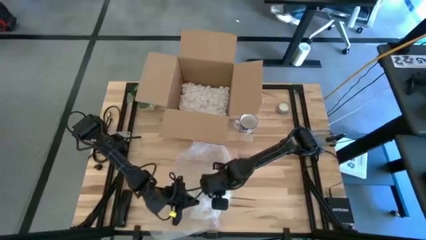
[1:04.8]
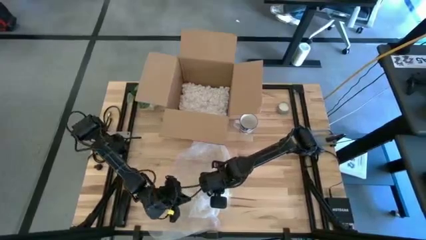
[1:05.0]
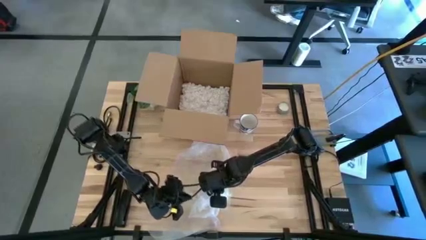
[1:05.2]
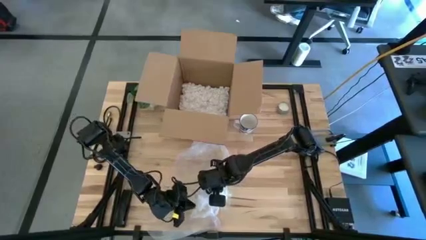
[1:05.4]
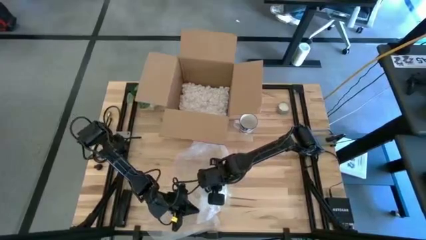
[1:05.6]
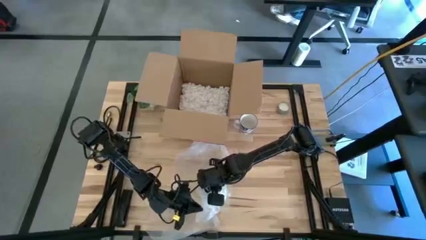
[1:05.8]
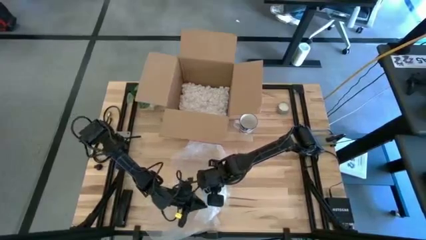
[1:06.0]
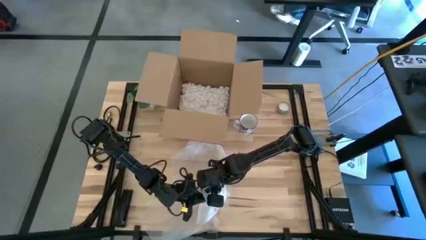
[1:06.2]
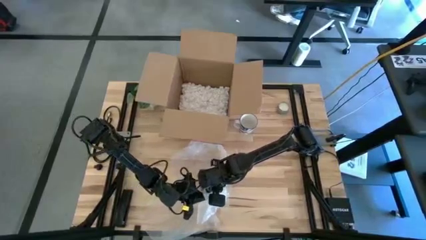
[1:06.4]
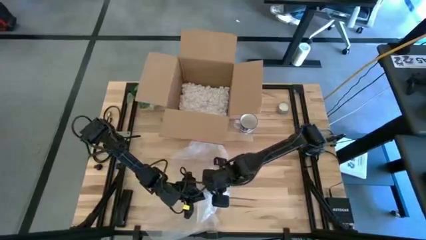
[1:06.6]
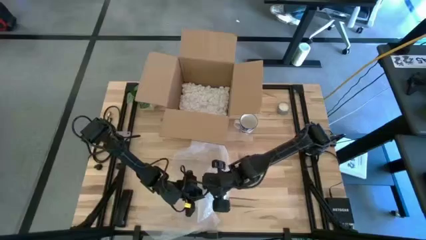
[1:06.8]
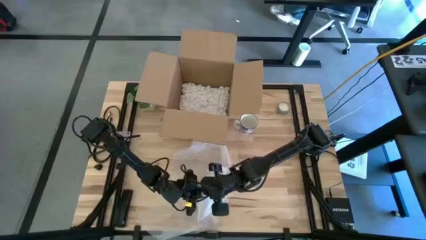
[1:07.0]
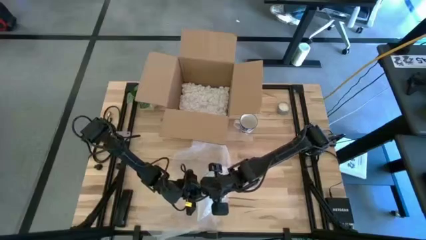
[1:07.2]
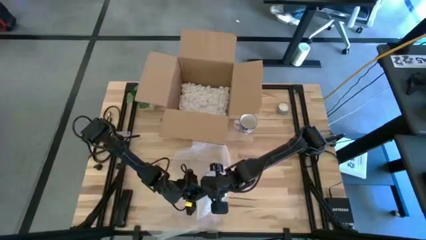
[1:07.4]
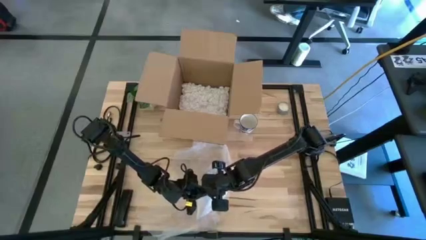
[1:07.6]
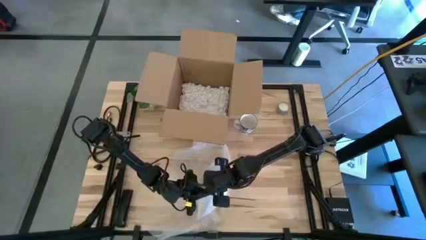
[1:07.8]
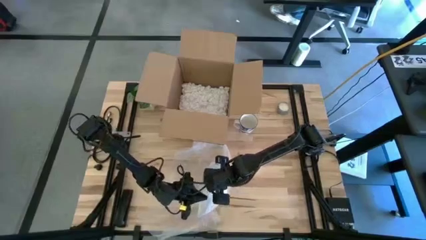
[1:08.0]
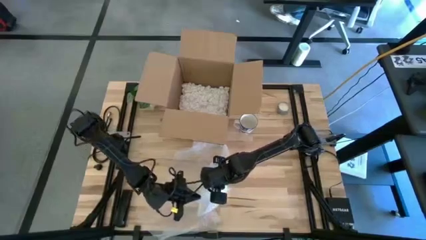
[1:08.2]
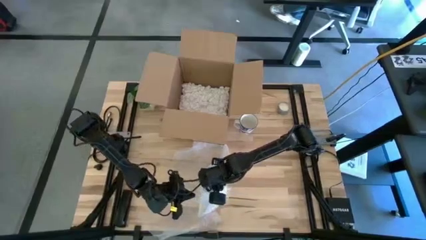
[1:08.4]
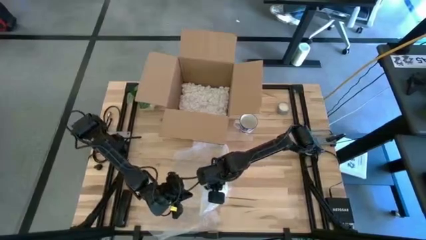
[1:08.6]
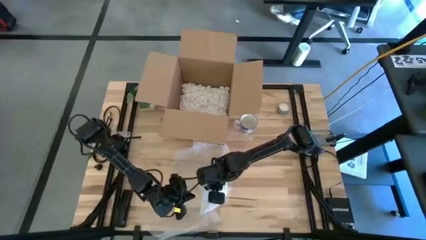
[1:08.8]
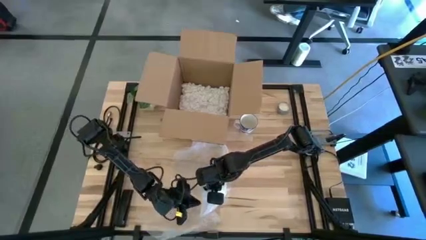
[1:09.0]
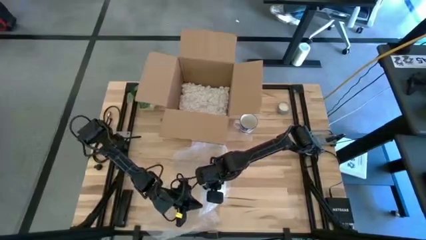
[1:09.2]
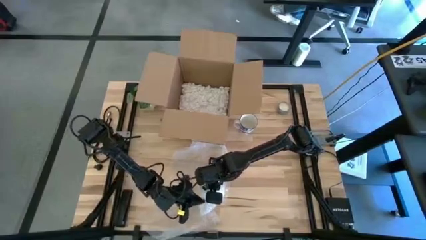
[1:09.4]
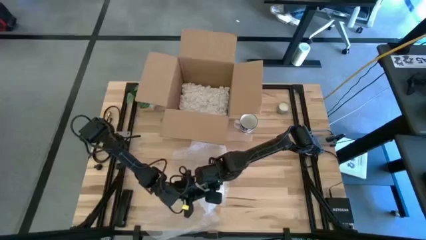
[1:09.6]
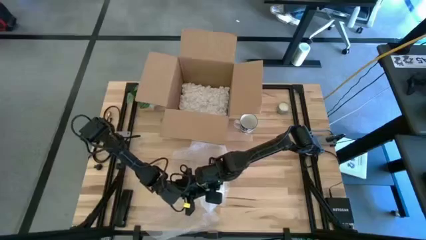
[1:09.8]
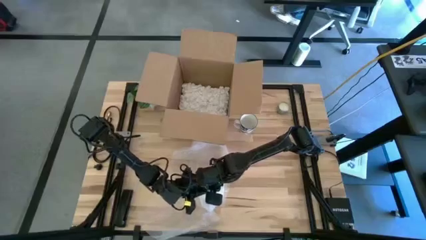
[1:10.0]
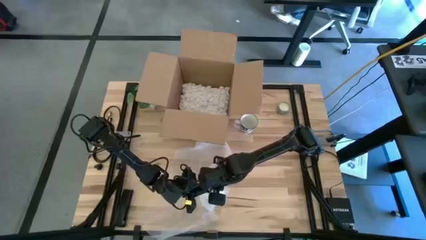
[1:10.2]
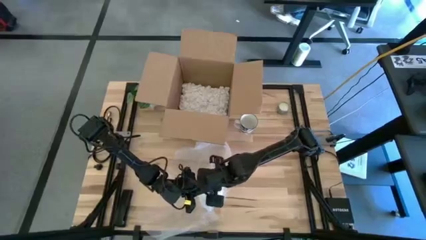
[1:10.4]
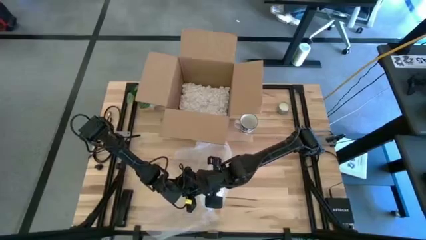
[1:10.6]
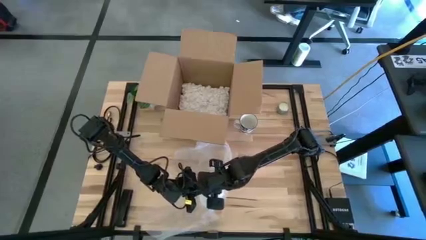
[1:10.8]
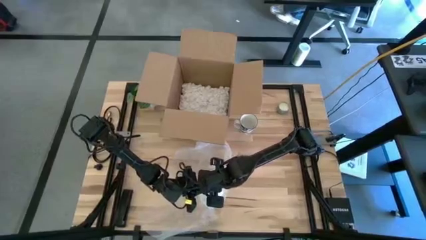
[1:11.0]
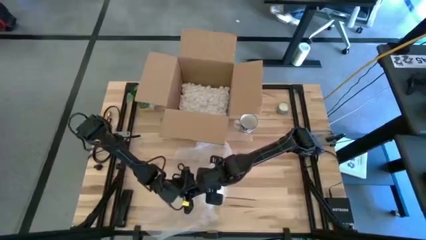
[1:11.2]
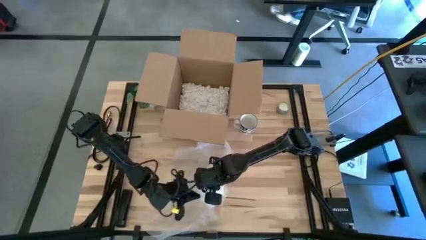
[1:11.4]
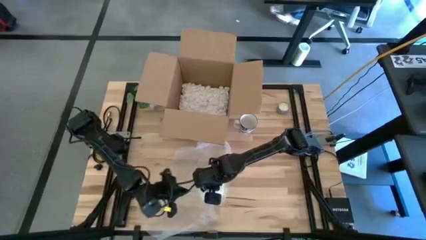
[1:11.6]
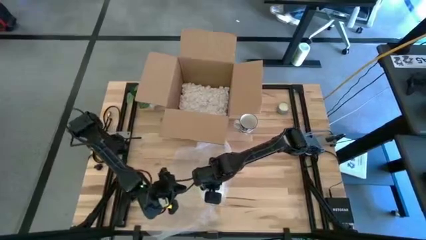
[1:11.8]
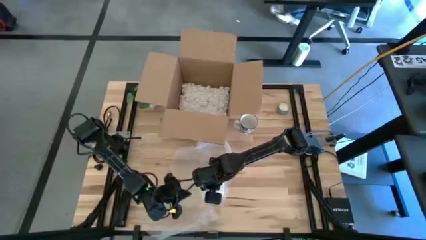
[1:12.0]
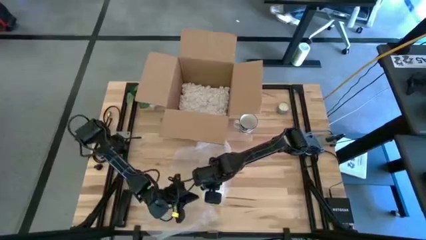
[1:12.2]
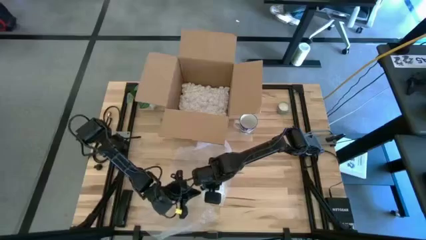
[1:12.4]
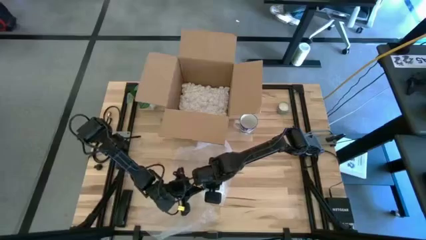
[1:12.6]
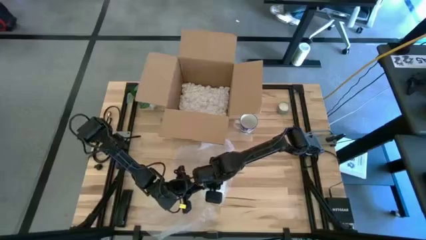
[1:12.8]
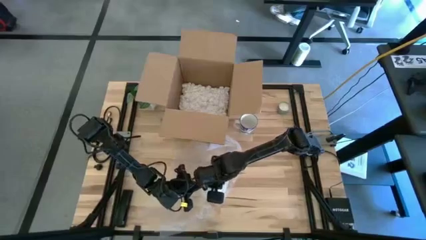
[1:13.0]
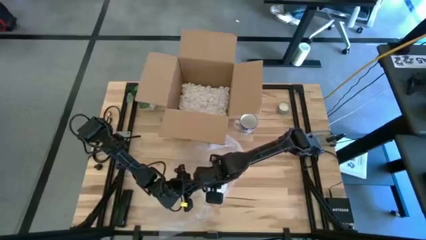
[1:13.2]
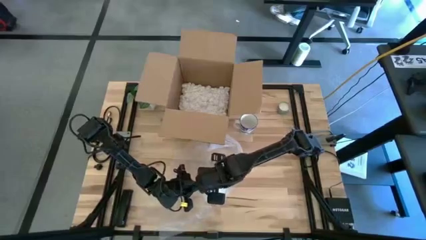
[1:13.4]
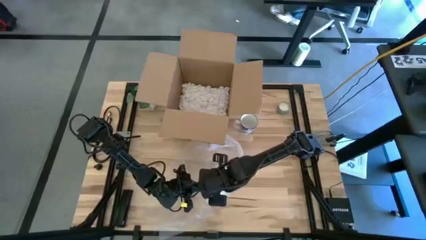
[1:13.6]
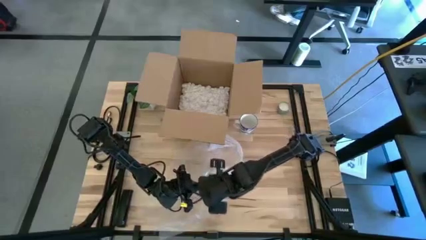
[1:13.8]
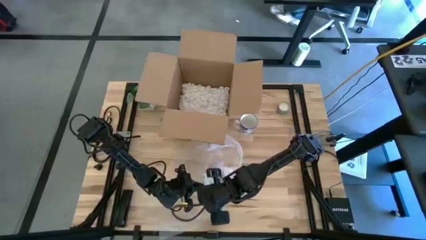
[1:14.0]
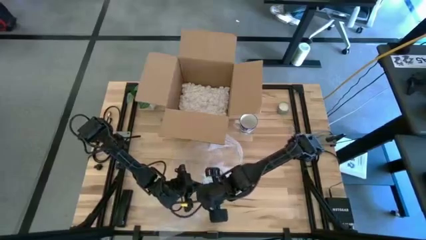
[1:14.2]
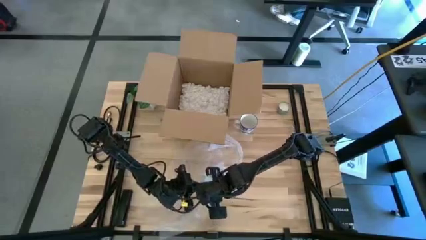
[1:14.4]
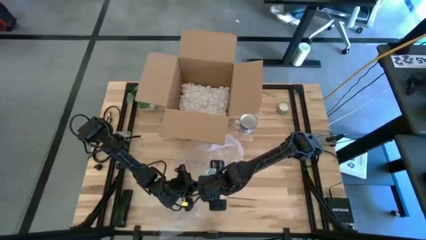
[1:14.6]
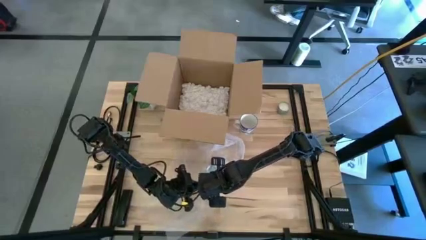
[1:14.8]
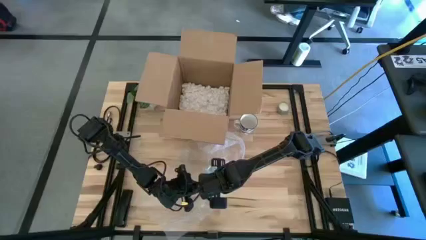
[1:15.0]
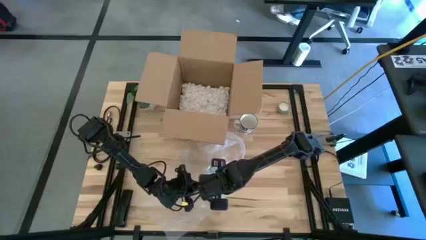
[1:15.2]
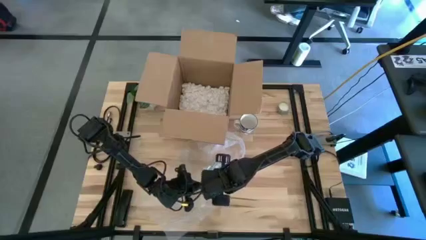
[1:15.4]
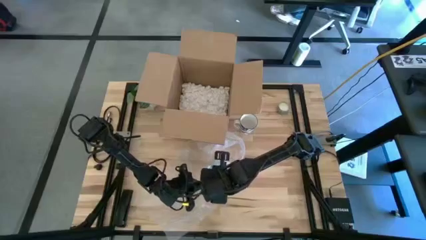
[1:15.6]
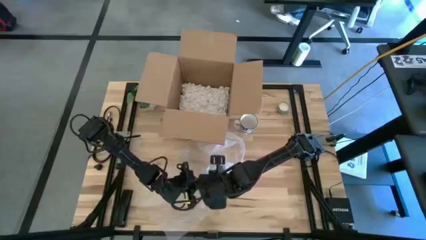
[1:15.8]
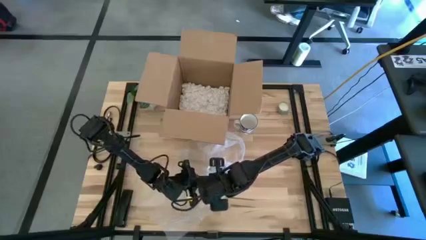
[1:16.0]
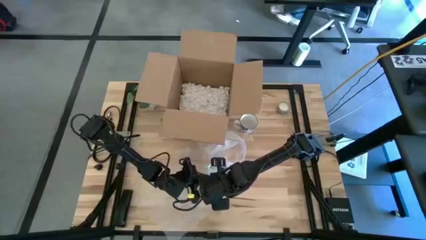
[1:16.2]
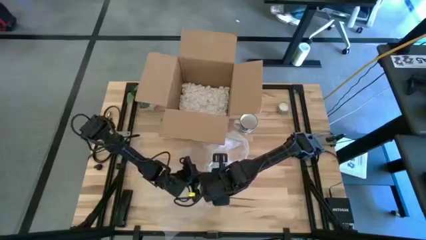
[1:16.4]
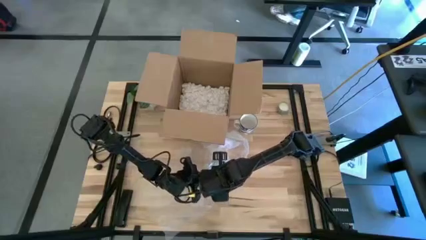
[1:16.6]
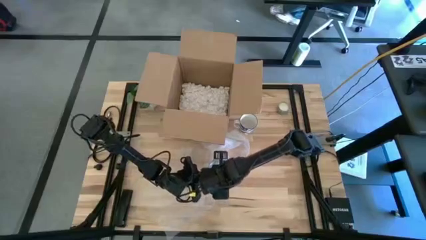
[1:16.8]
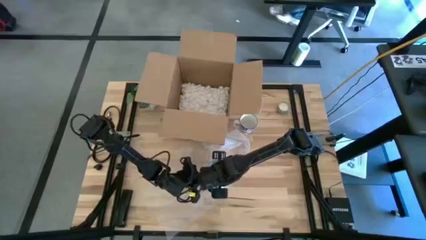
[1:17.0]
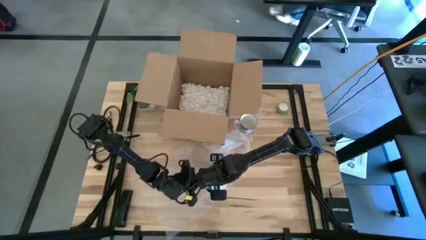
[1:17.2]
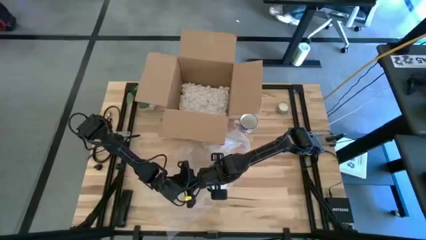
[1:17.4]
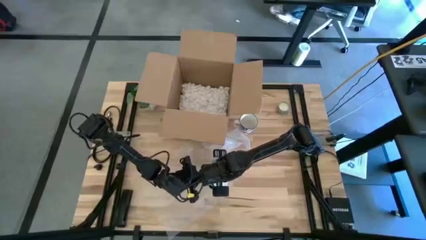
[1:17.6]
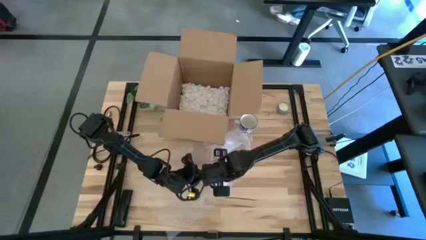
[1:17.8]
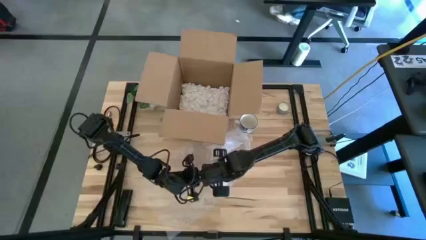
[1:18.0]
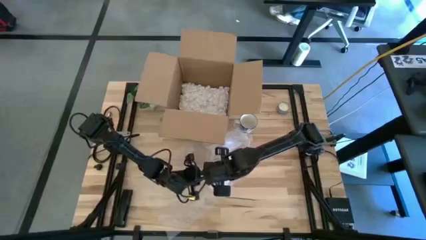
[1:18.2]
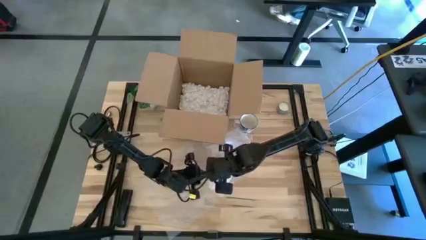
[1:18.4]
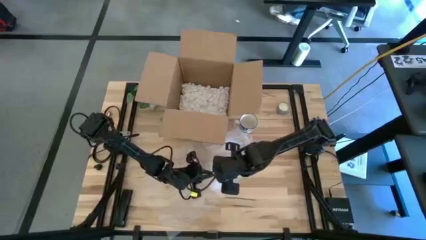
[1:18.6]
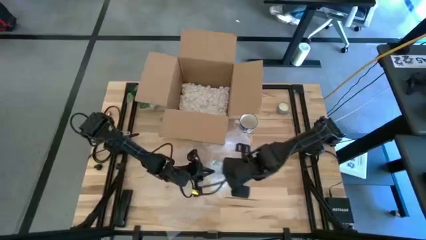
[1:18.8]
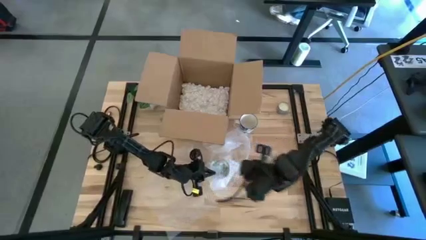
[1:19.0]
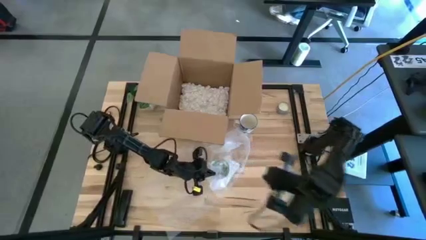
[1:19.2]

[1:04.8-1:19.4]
Task: wrap mug
Wrap the green mug with the bubble wrap

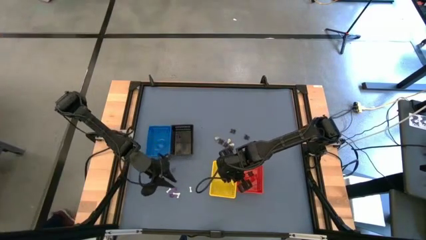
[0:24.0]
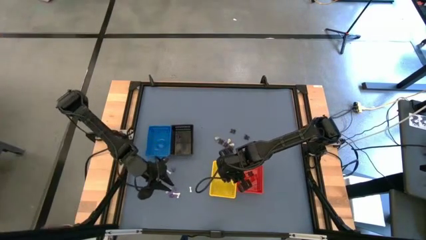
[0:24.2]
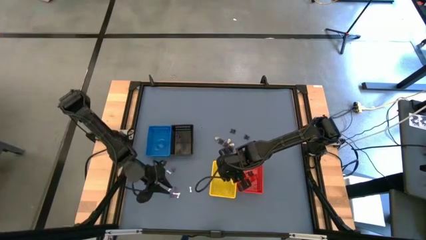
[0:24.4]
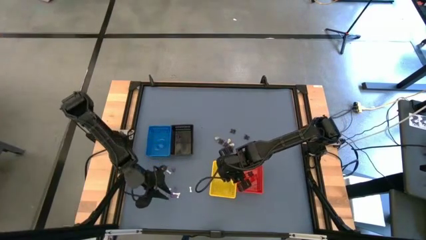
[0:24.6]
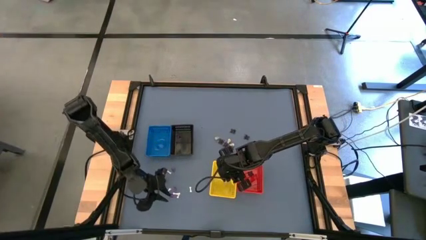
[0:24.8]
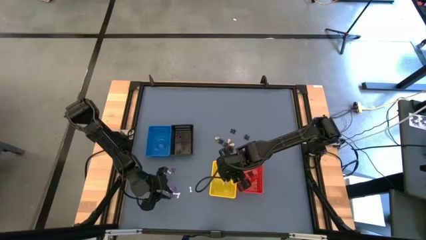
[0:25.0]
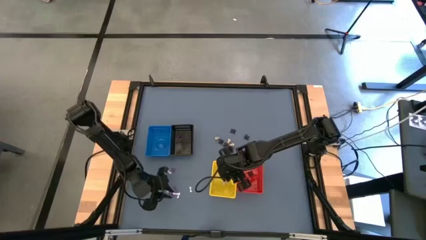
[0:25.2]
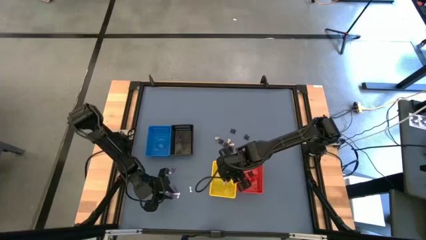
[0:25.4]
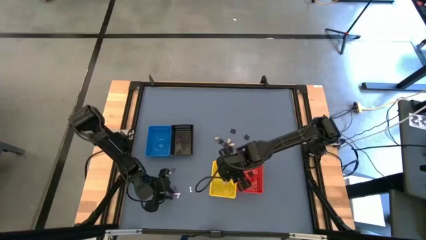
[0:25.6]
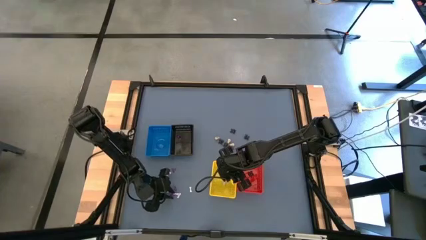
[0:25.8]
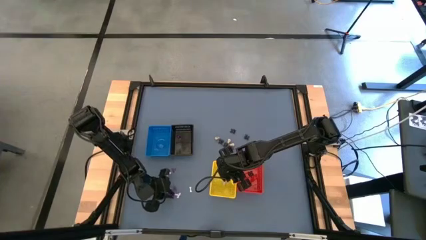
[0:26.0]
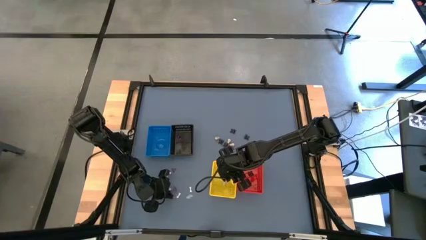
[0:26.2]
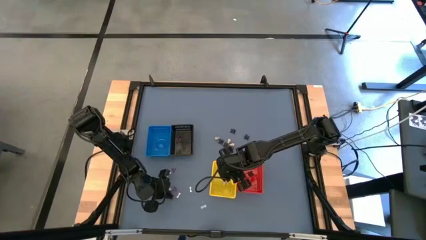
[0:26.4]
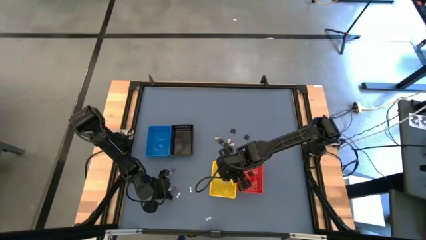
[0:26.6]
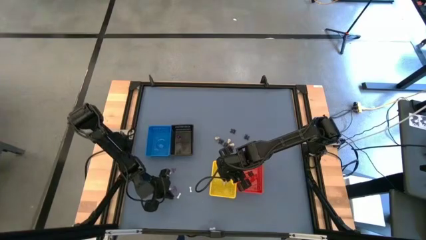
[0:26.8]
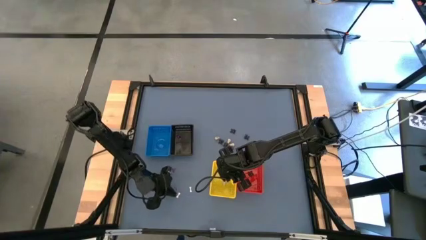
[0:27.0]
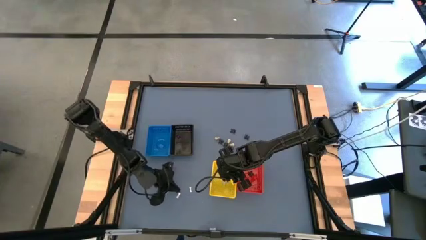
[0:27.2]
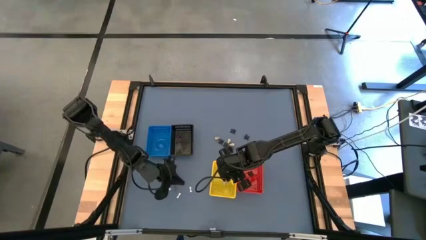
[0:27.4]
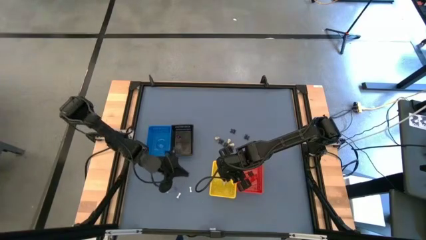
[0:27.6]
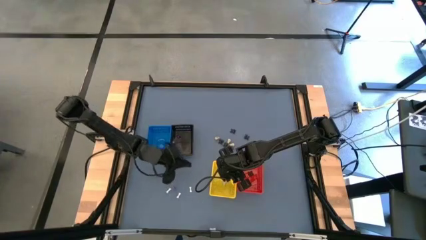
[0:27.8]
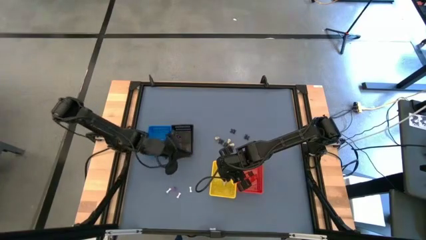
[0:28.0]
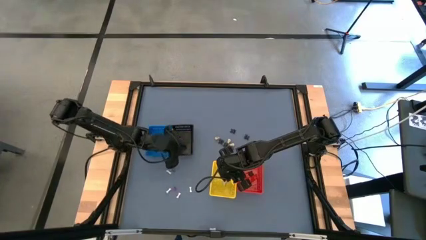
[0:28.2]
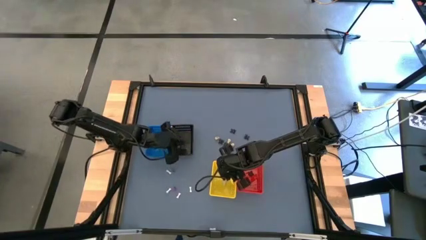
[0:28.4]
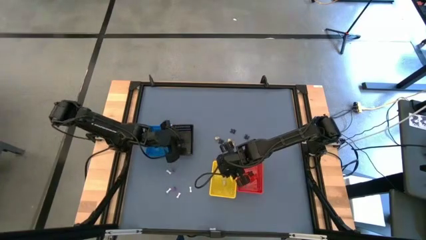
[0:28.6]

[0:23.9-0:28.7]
Task: Sort Halloween decoration
Put the witch hat toy into the black bin
